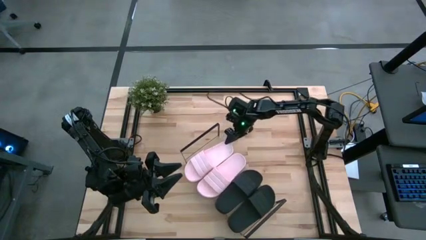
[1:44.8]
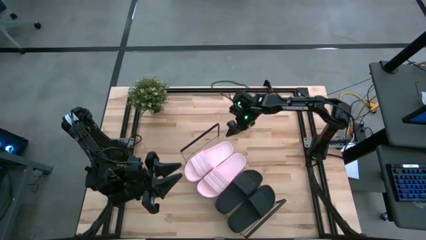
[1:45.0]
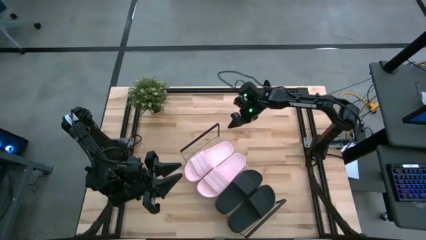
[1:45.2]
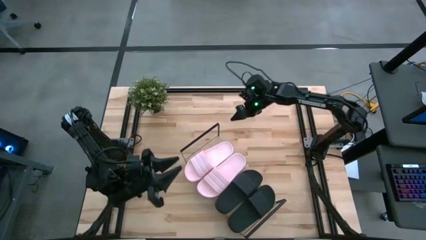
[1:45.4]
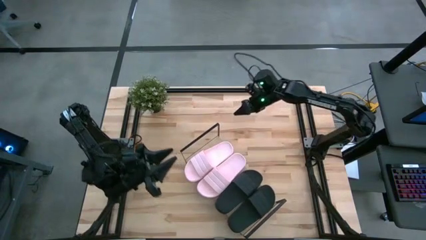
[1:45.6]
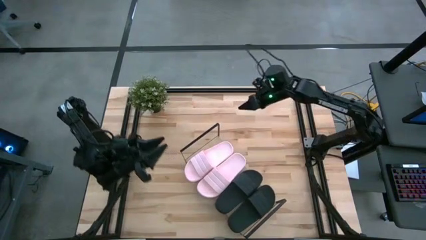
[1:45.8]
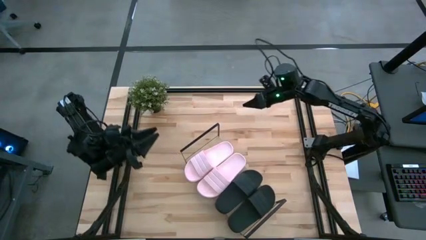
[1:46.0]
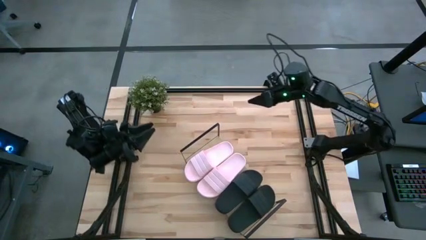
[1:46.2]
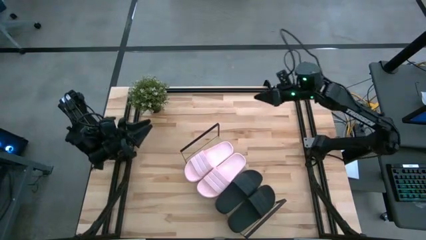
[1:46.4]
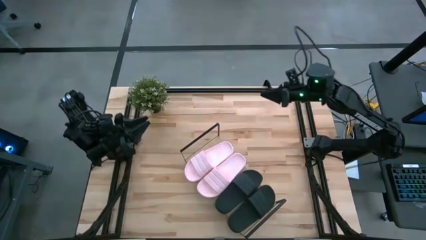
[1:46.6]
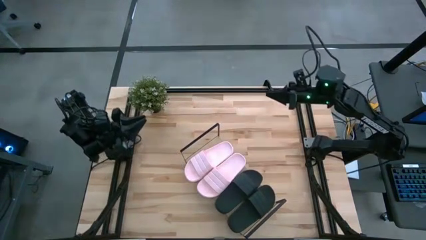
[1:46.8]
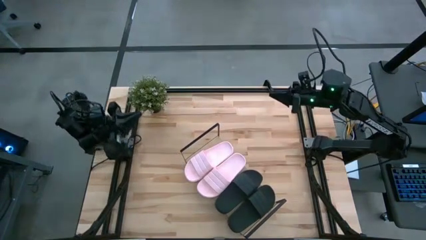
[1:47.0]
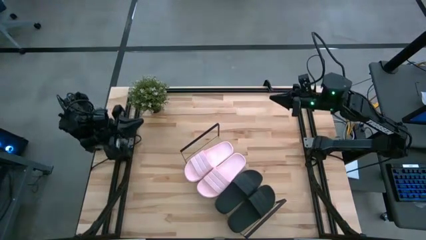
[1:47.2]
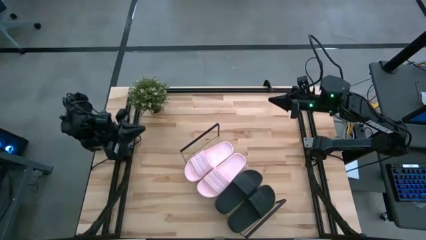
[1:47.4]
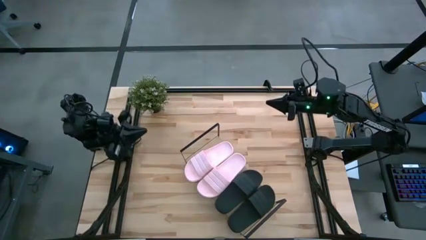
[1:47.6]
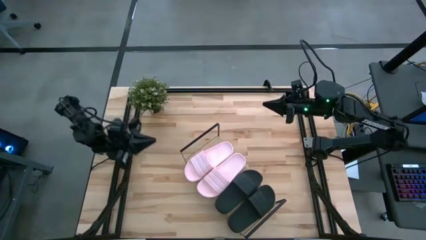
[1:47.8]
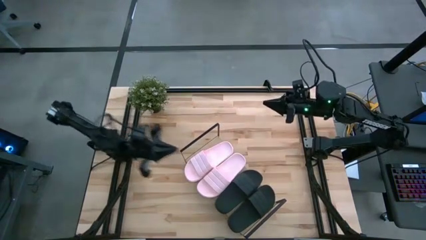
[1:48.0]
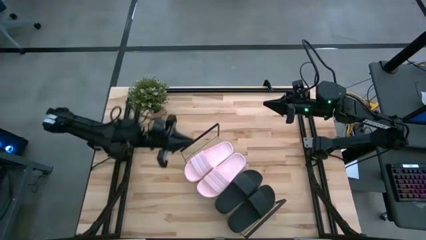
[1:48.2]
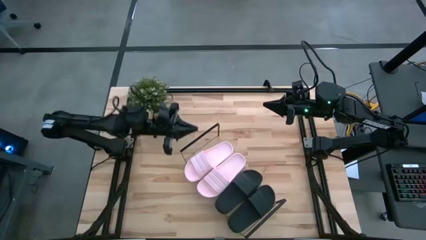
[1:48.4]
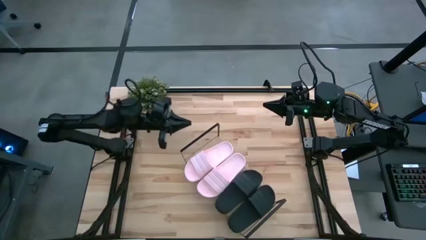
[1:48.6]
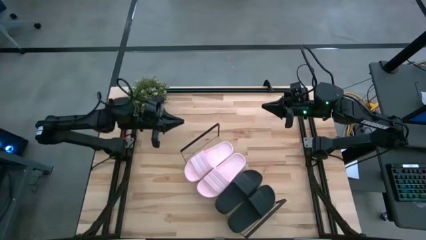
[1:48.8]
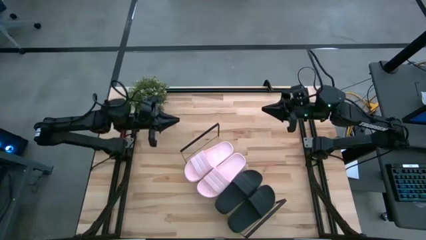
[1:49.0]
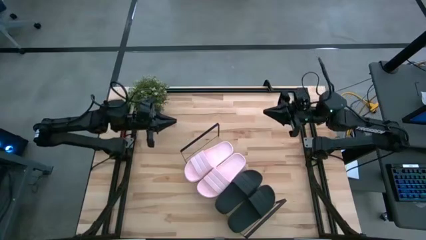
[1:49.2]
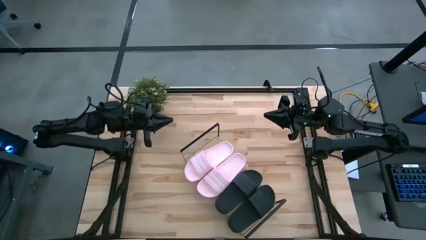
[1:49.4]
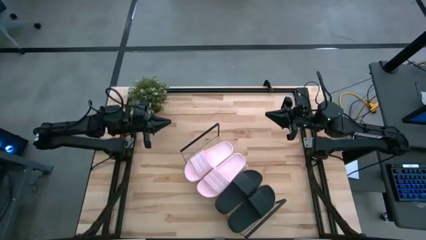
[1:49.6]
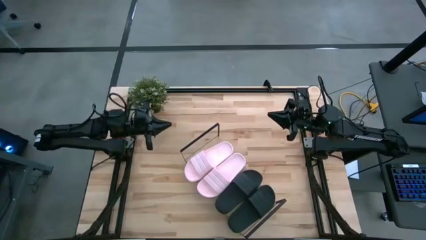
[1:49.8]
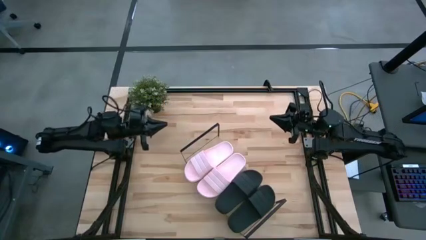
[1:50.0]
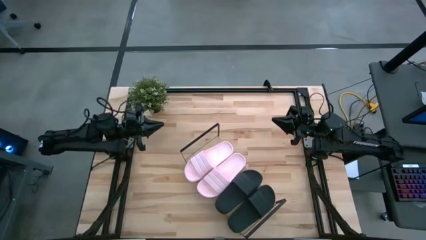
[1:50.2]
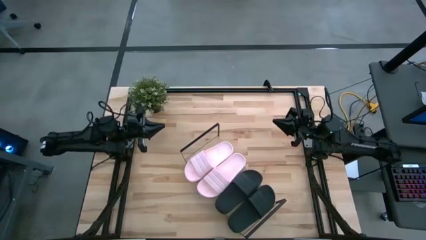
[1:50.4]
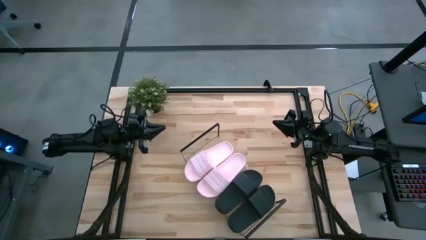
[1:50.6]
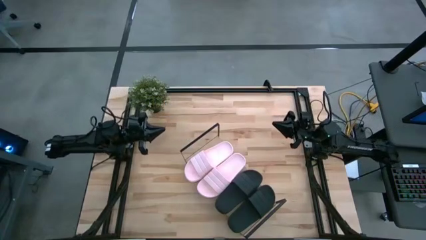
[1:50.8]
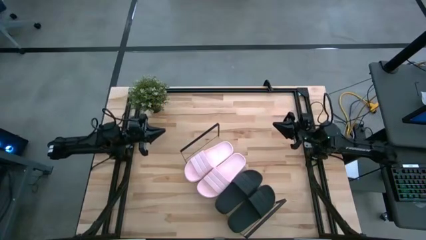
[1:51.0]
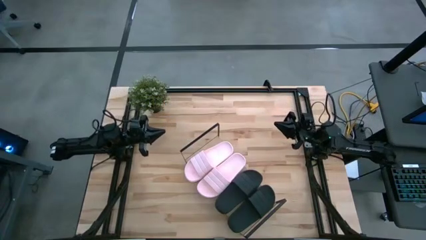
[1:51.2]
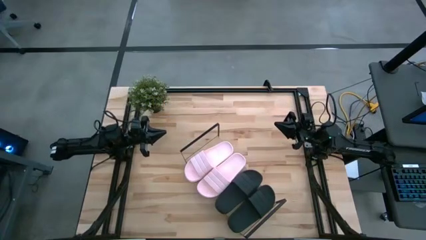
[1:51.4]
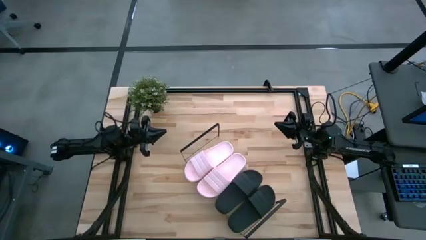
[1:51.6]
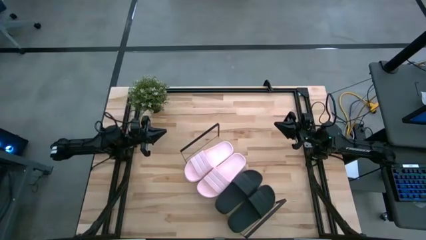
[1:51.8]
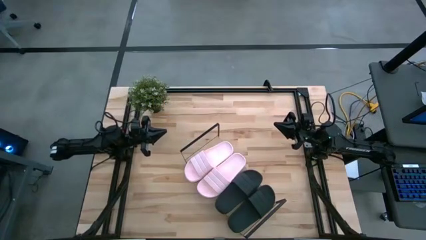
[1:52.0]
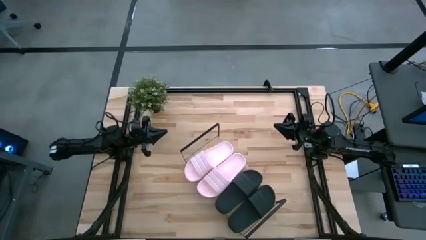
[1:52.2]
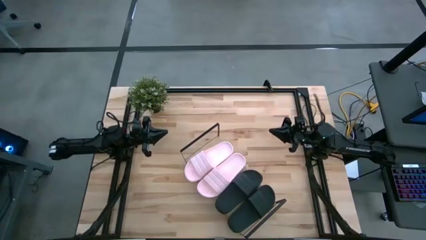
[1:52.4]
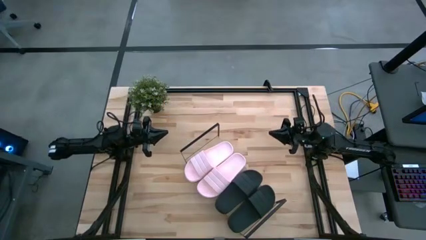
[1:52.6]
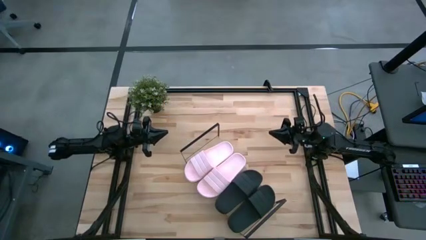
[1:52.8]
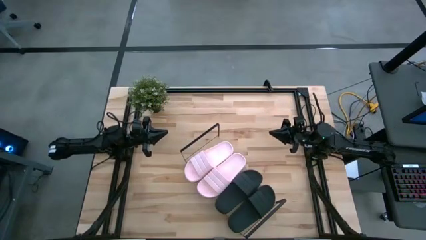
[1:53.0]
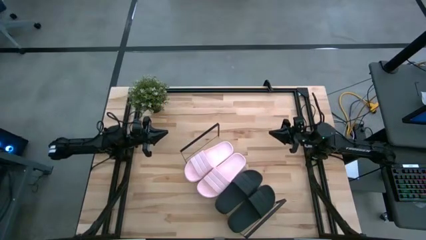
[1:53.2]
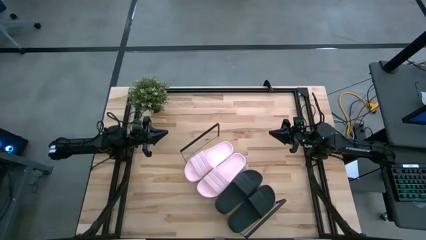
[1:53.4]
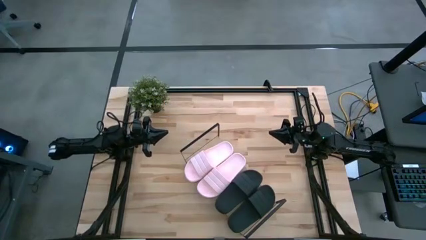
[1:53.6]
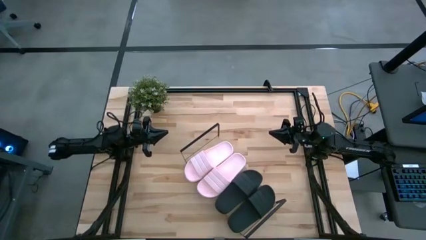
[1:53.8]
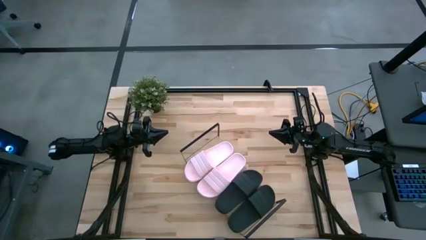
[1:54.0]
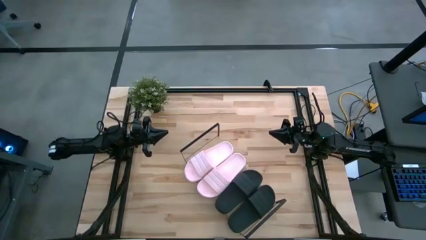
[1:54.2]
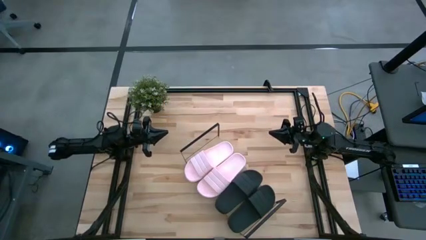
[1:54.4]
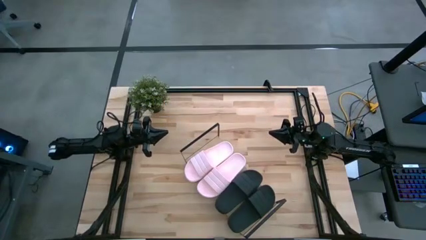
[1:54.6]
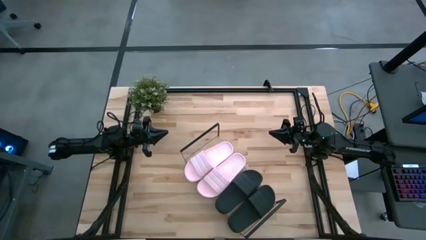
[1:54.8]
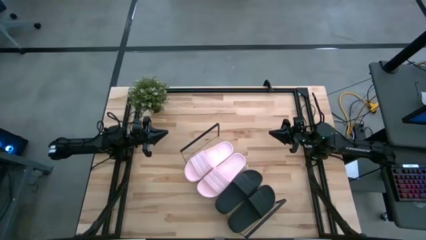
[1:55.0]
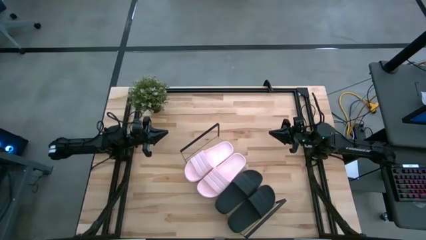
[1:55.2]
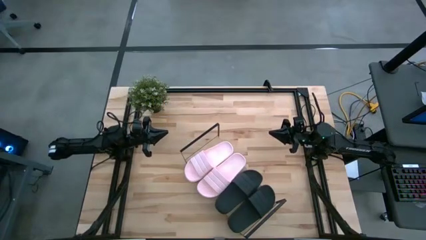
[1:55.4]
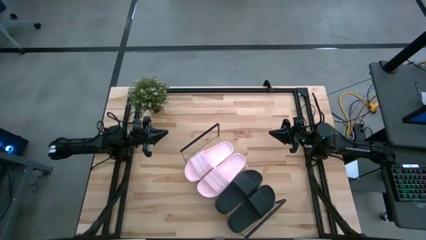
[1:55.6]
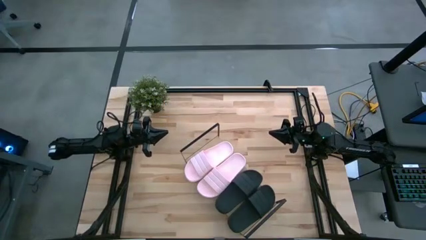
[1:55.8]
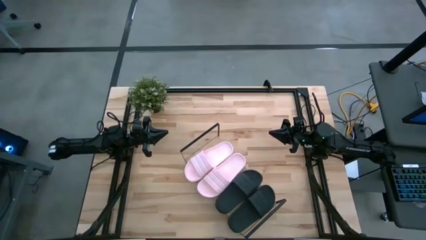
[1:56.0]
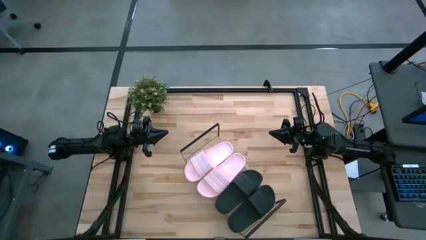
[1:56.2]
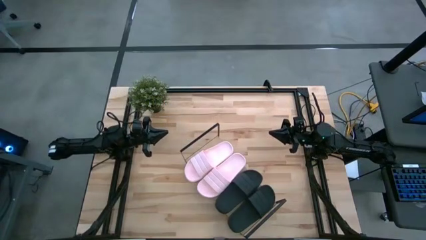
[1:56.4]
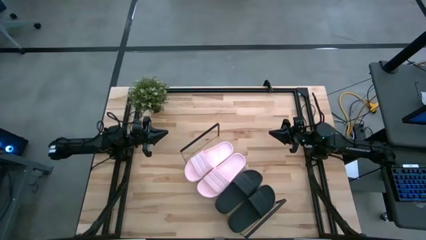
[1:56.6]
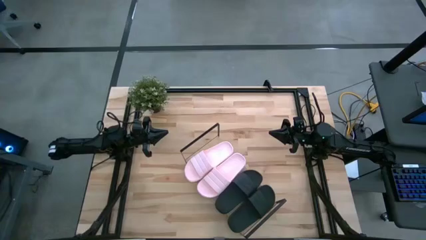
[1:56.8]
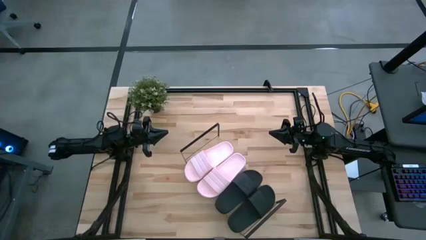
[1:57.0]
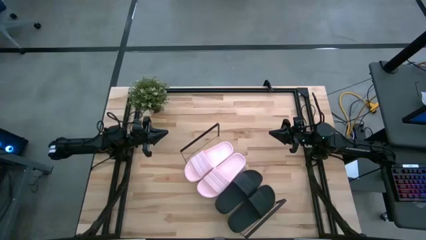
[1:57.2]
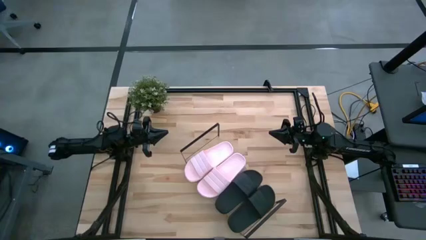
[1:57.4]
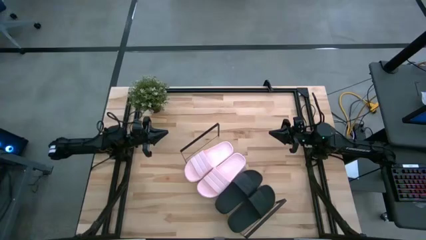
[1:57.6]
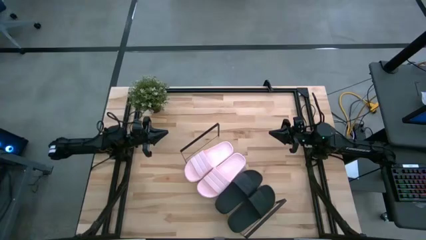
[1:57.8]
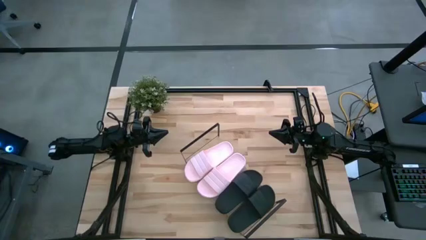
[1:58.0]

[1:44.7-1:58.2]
Task: Pick and place slides into the shelf
Return to Home Position

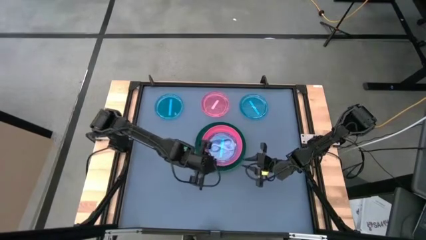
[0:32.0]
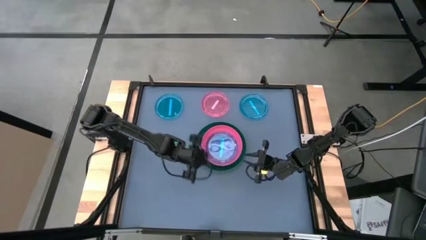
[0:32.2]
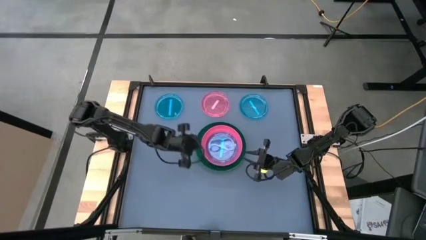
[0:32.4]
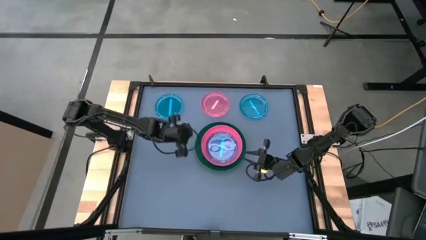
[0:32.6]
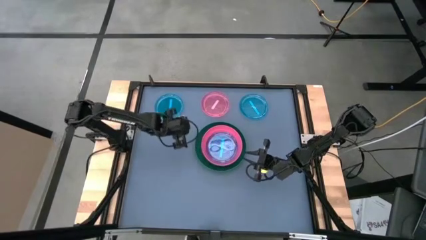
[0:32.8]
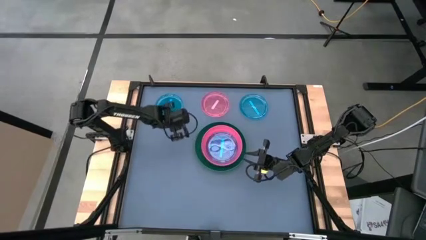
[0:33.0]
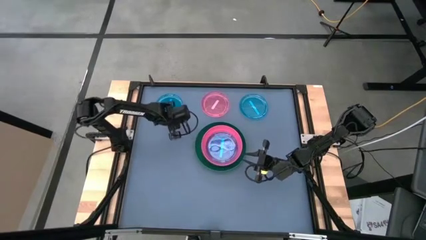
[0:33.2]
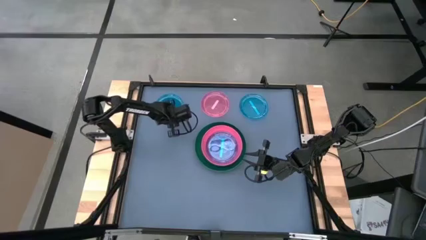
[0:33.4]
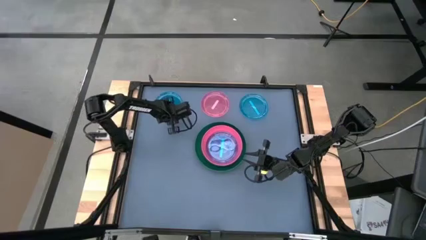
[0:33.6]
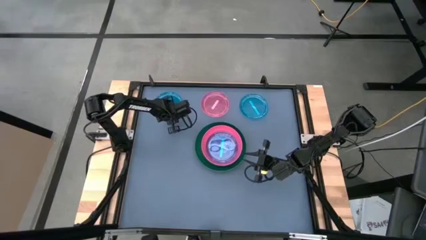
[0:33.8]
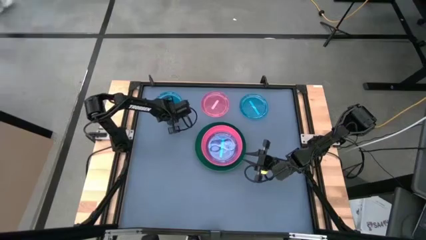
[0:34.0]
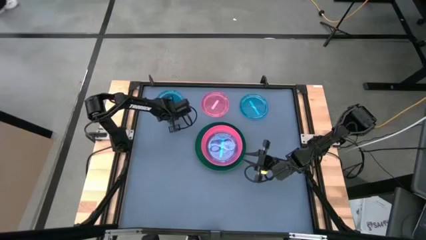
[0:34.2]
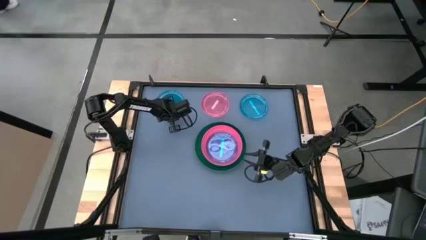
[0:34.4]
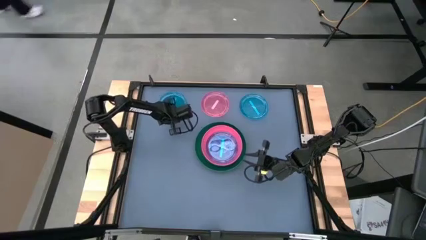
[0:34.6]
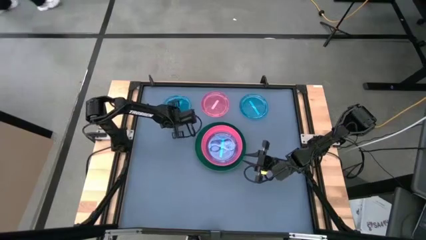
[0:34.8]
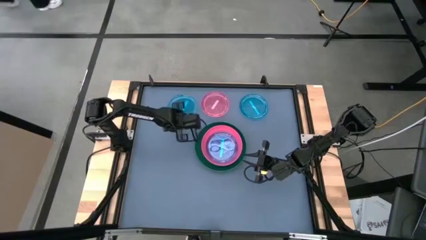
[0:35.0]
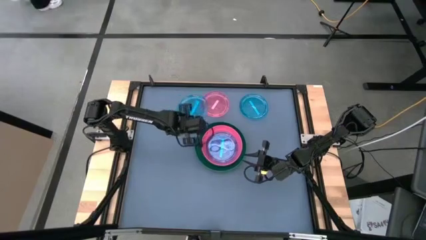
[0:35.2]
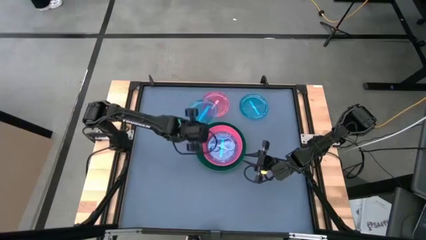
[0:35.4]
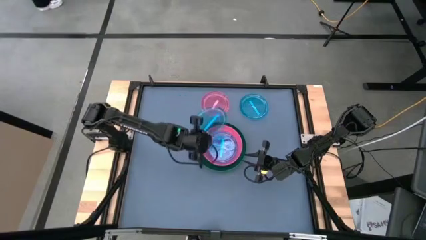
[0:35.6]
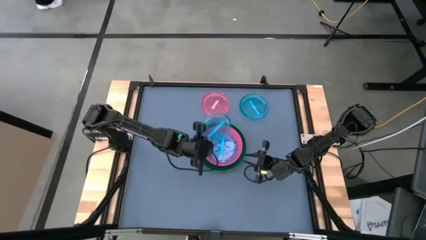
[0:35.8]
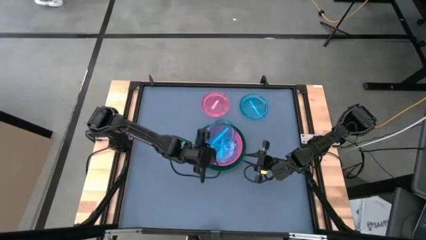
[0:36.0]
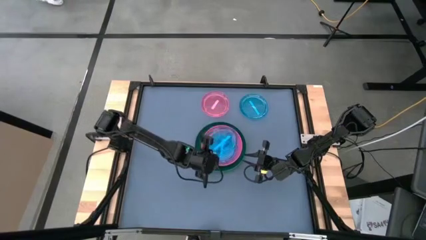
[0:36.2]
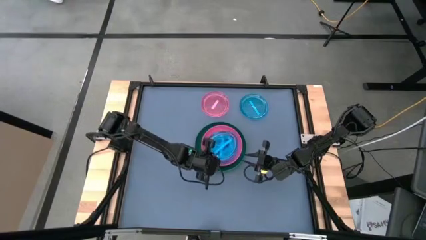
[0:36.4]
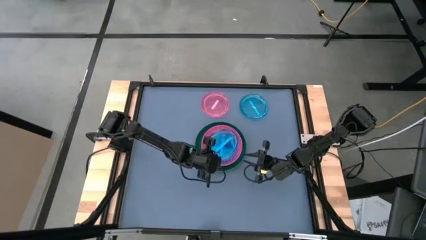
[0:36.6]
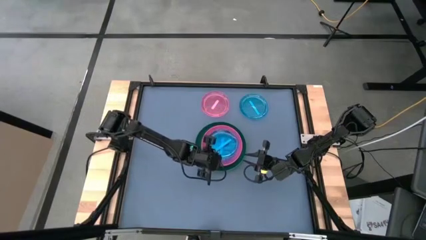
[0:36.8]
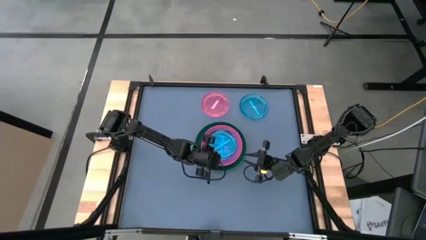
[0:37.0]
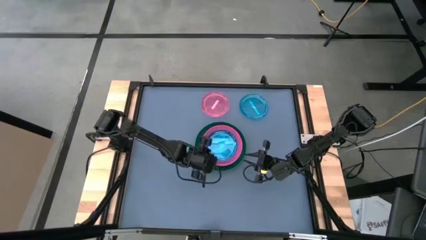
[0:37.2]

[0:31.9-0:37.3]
Task: Stack plastic plates
Stack the blue plate on the blue plate
